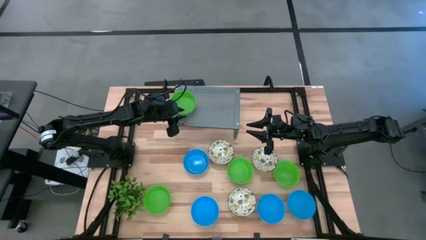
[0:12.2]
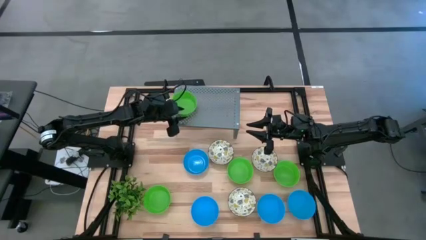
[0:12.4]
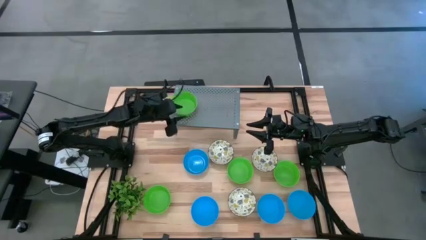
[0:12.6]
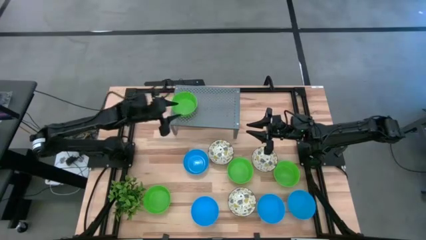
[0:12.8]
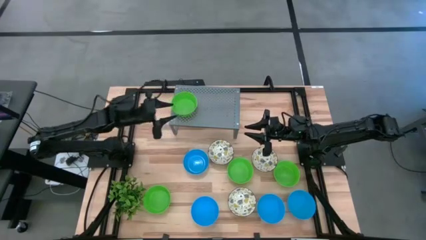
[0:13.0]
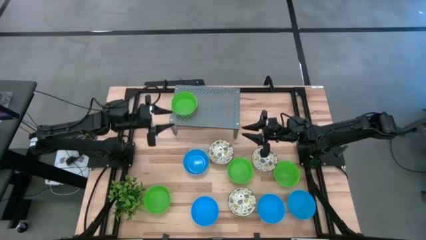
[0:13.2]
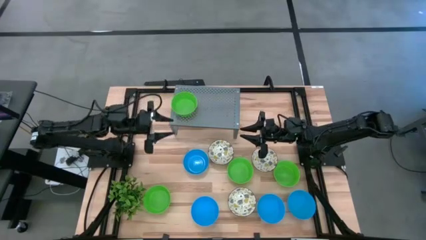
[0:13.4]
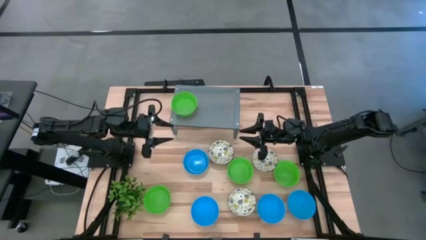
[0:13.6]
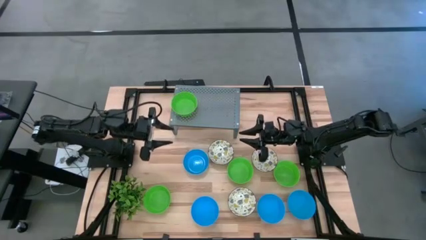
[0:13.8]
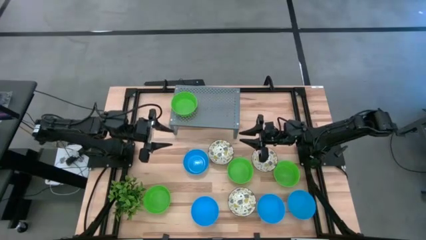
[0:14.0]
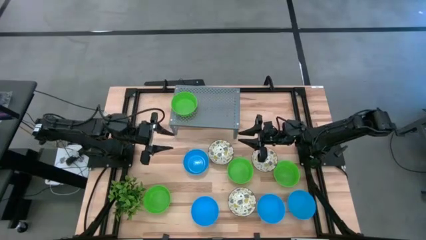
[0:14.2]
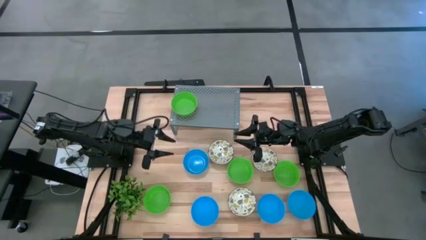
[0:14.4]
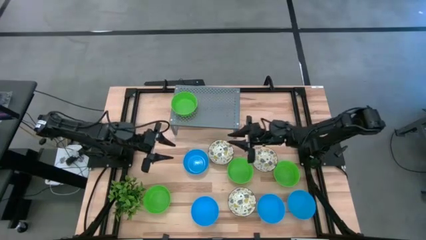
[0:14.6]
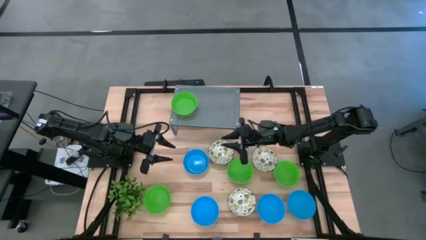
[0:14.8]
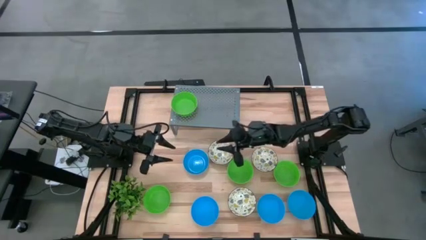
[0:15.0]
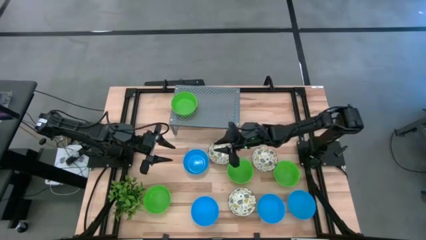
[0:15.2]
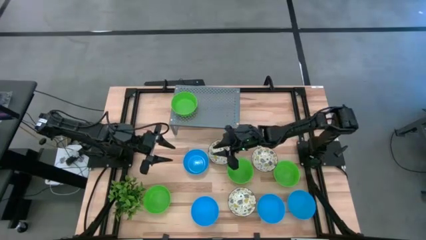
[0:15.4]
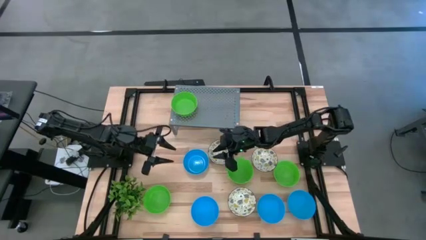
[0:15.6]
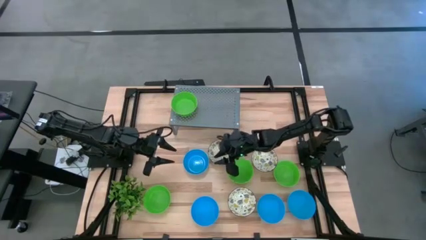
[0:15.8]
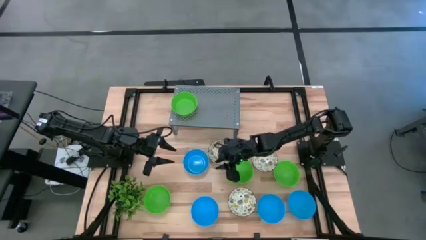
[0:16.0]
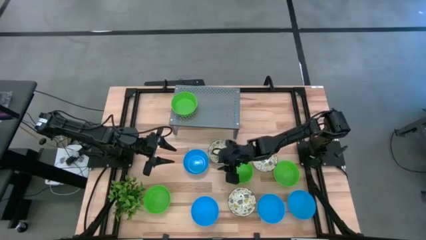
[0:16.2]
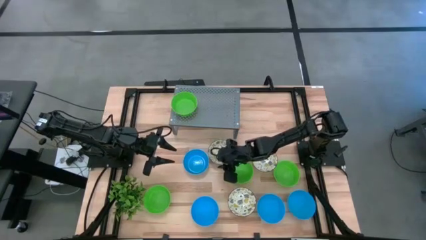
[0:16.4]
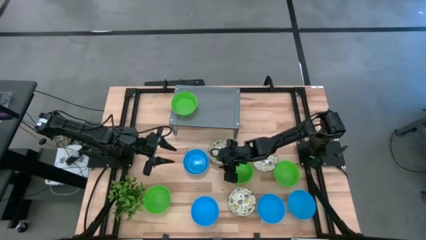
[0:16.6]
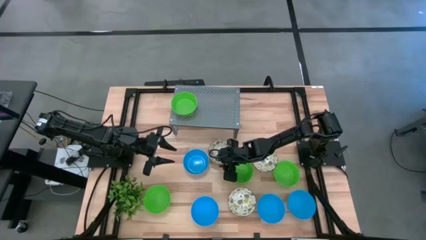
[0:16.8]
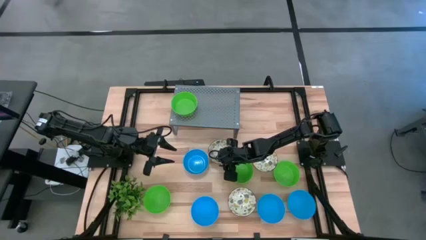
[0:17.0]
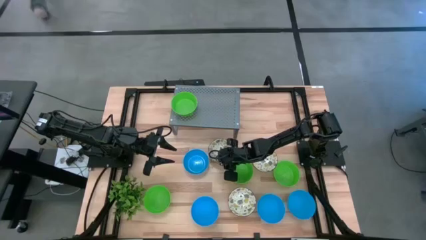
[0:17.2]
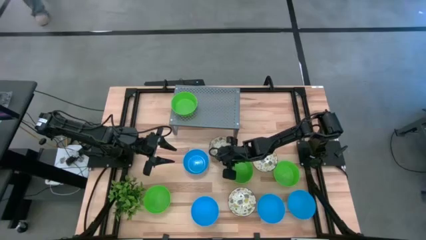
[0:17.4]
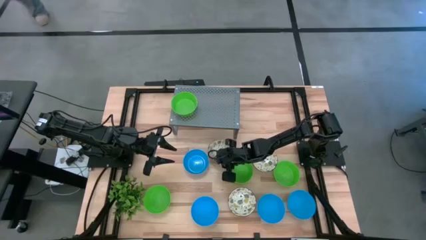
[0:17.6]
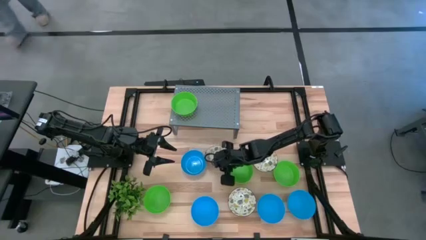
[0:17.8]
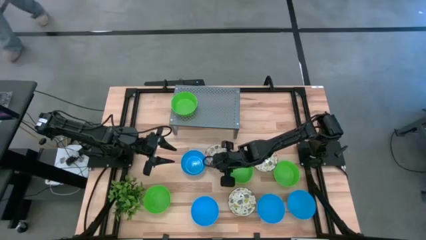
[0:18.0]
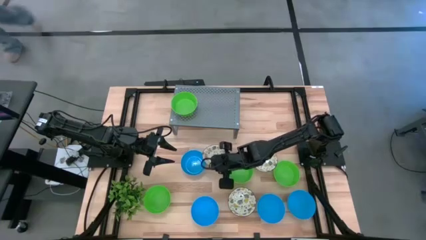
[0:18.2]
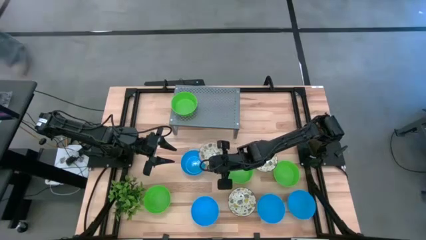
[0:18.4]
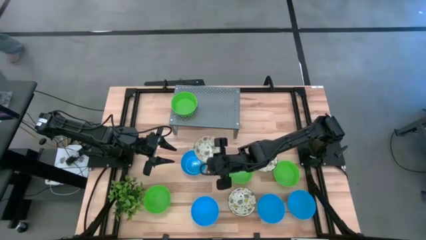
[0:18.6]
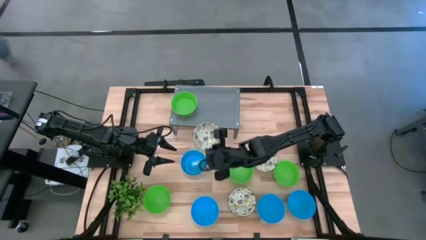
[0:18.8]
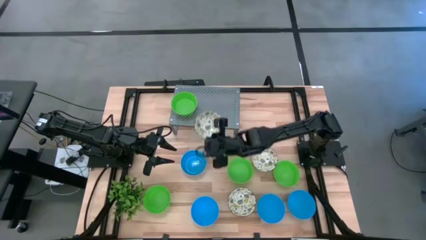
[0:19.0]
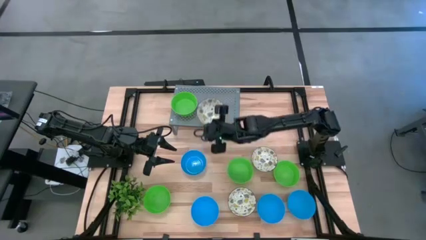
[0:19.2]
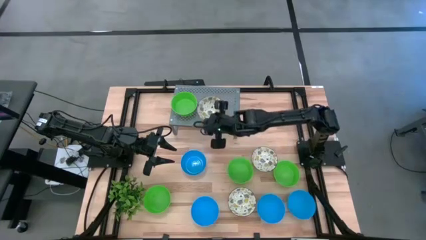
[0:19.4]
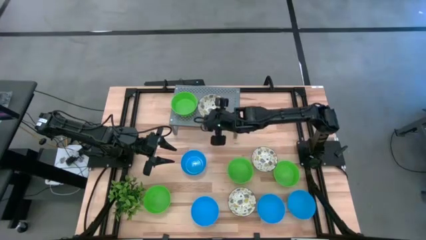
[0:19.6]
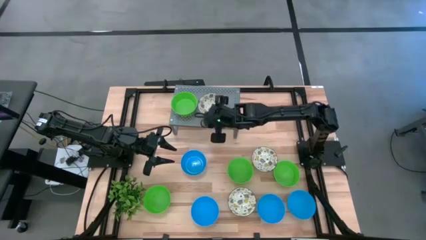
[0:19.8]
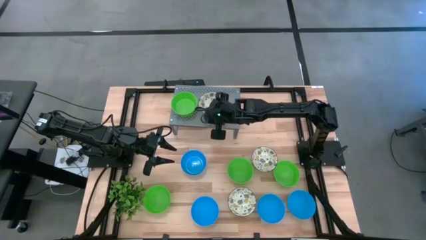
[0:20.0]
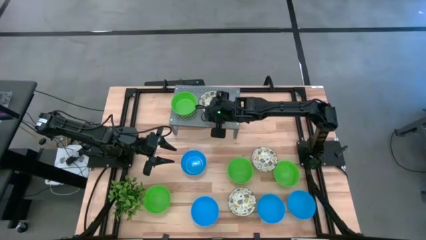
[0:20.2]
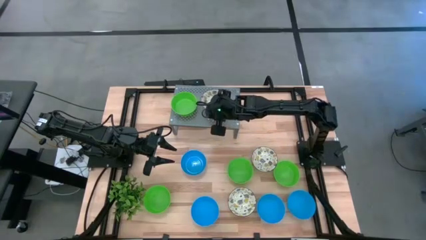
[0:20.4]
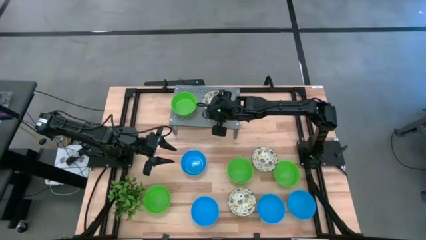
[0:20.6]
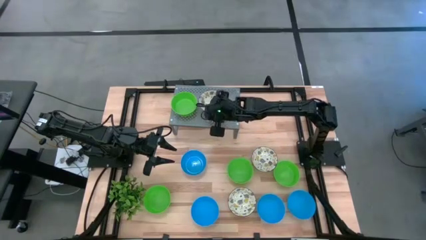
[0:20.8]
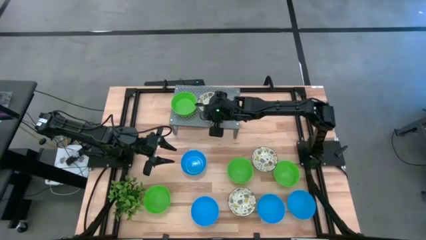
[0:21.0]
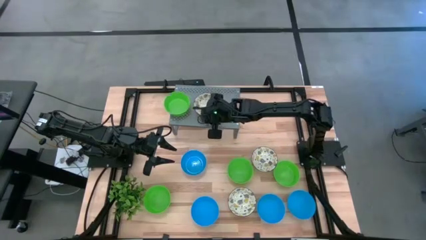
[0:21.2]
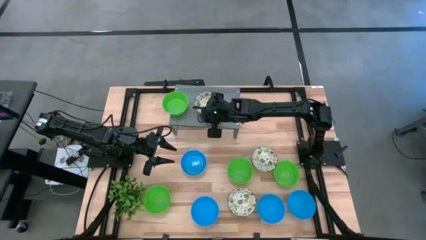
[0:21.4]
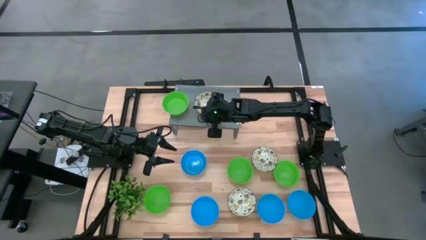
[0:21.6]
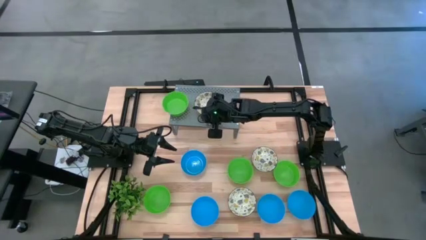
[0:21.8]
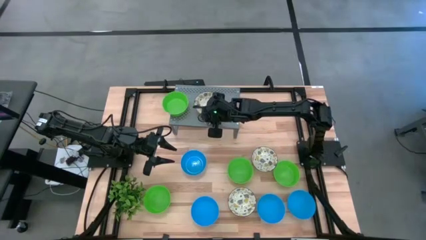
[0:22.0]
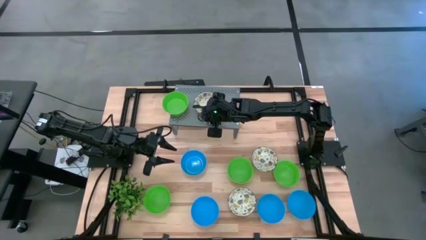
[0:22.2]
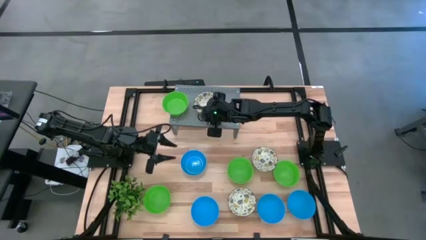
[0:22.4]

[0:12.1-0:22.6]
Task: Pick & Place Mini bowls
Put the white patterned bowl on the shelf

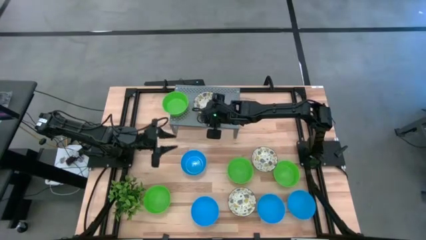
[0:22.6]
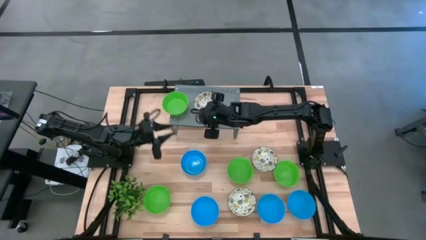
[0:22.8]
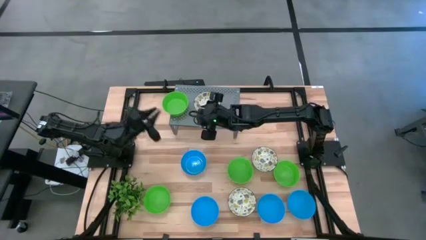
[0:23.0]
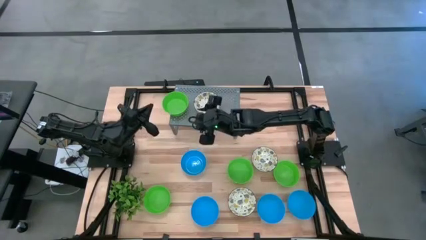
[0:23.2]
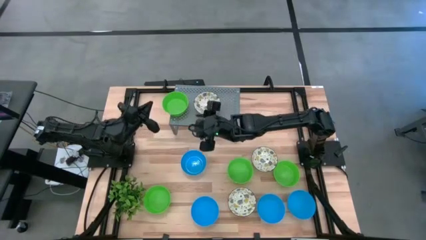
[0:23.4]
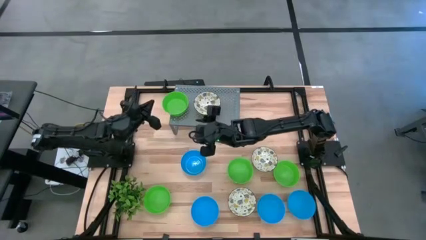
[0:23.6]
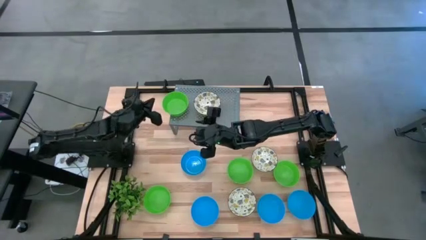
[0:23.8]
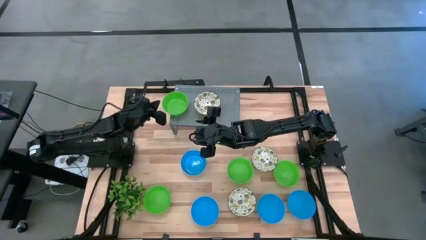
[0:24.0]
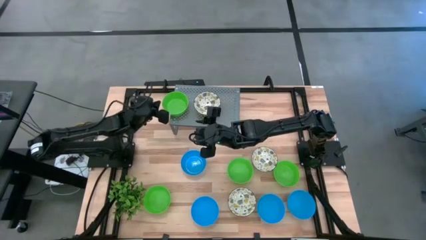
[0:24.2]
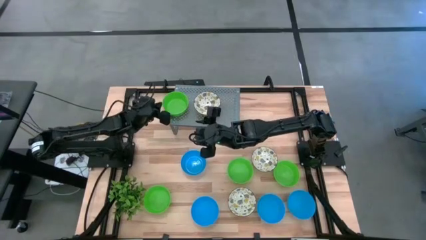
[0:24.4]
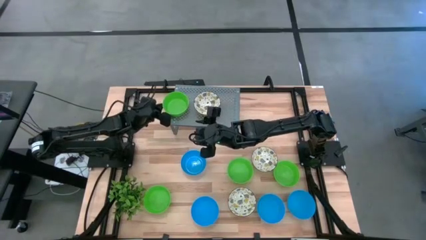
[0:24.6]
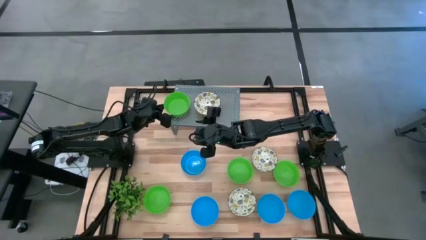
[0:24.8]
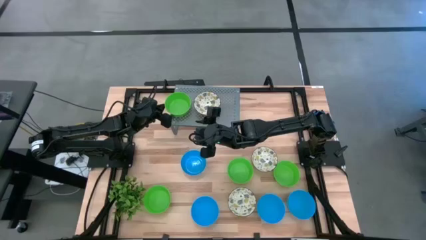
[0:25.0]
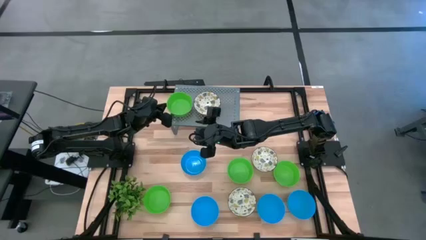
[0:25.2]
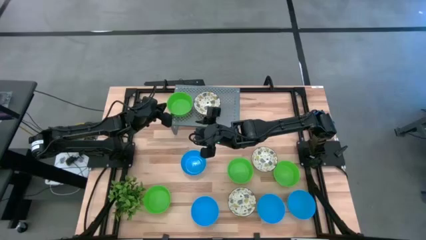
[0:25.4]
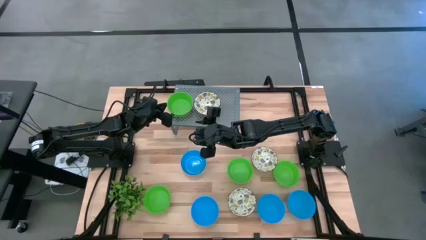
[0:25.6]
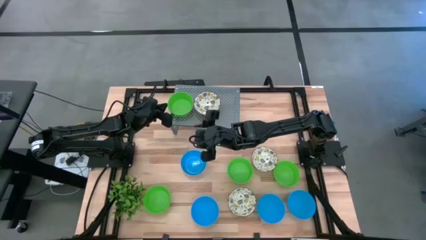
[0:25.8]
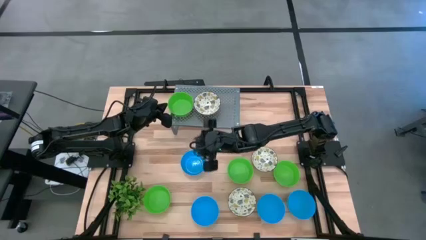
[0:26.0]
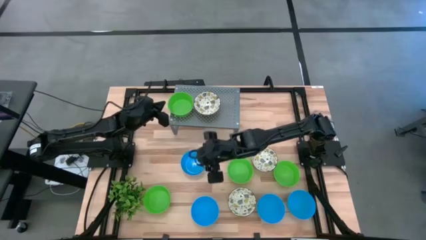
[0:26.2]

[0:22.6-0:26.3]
Adjust the green bowl on the shelf
